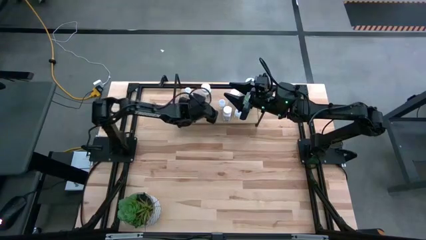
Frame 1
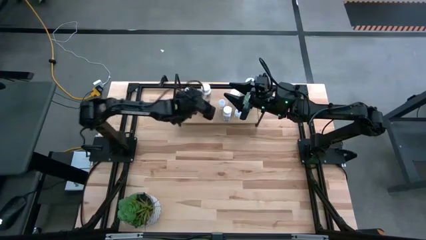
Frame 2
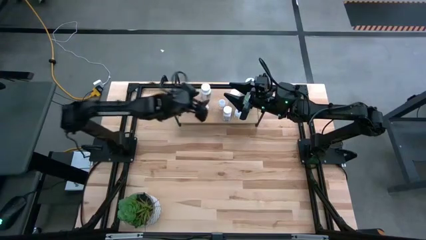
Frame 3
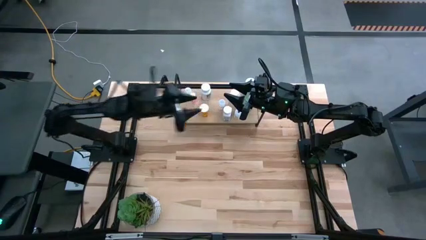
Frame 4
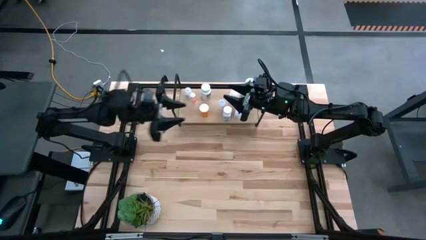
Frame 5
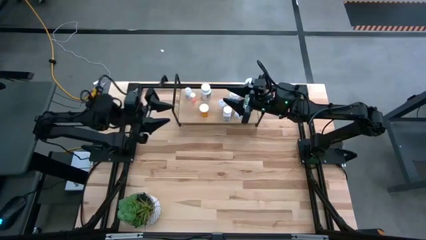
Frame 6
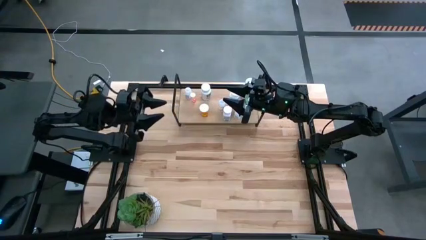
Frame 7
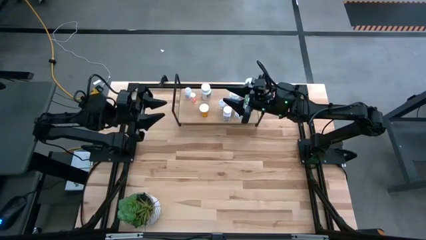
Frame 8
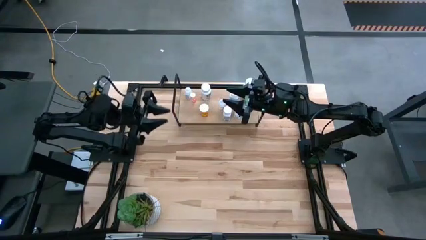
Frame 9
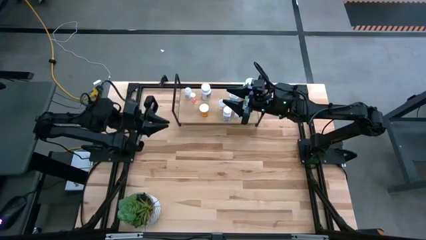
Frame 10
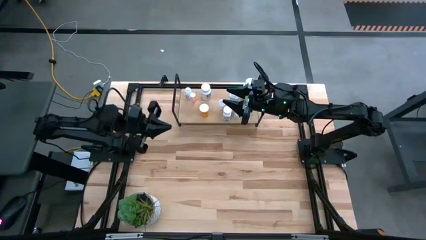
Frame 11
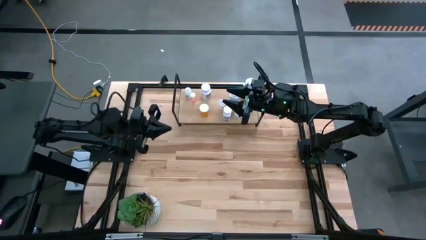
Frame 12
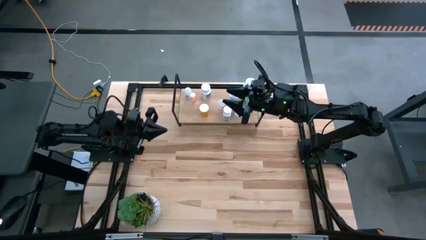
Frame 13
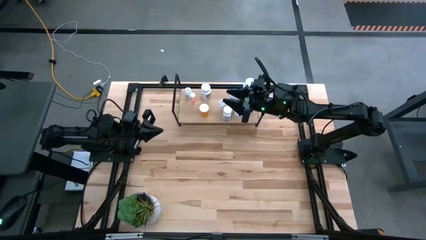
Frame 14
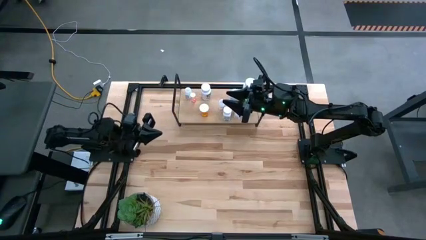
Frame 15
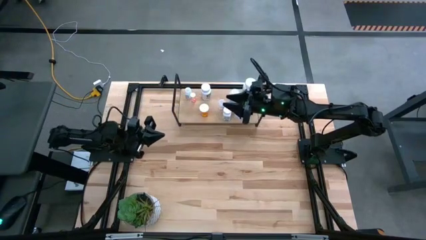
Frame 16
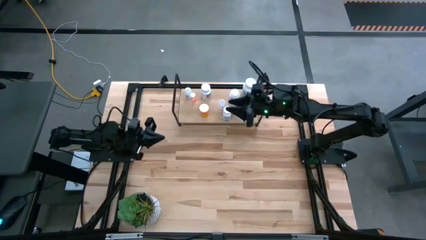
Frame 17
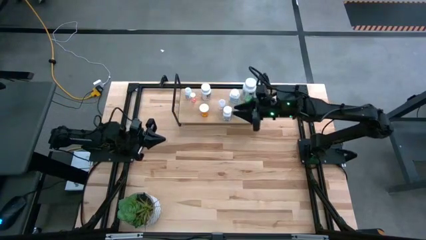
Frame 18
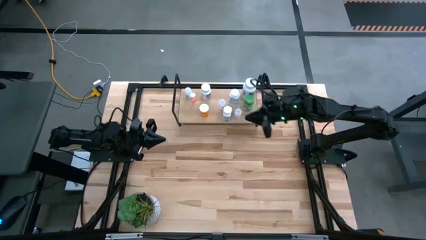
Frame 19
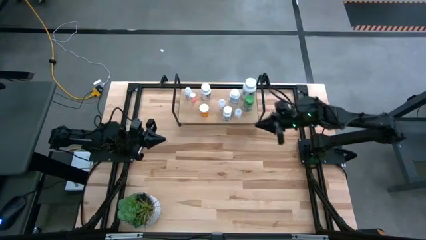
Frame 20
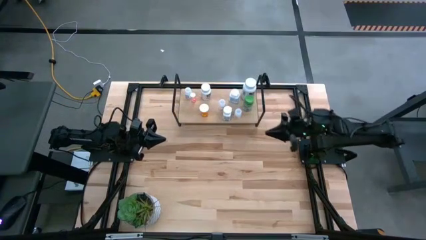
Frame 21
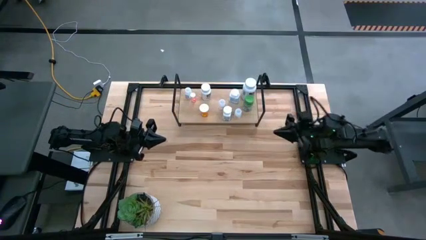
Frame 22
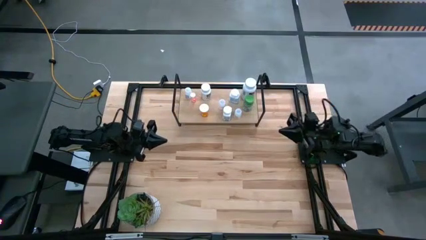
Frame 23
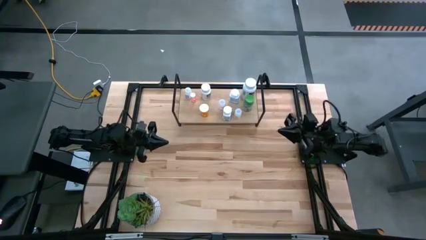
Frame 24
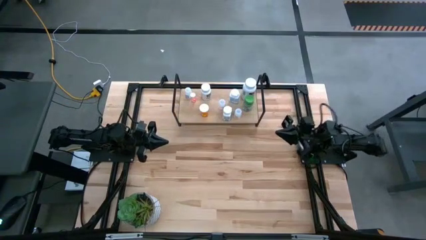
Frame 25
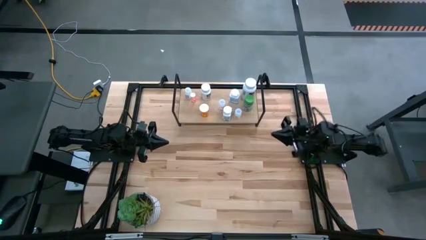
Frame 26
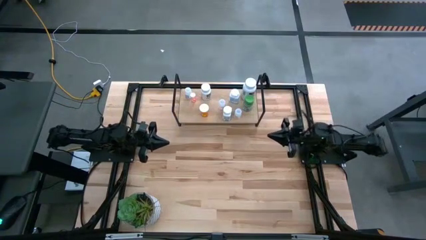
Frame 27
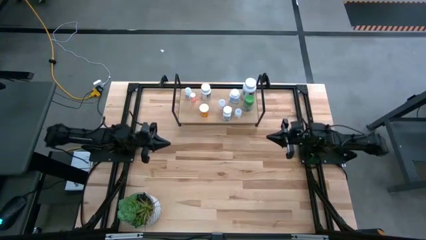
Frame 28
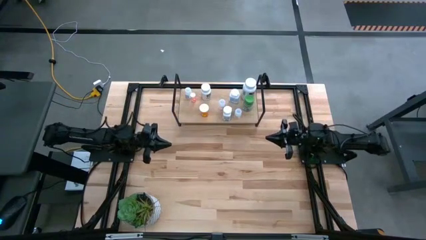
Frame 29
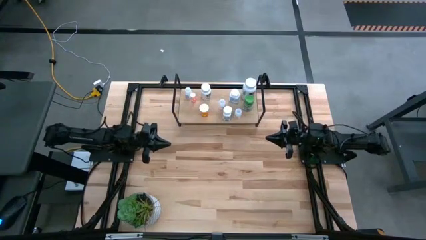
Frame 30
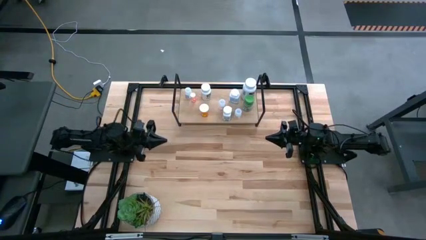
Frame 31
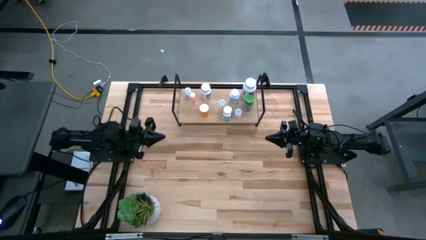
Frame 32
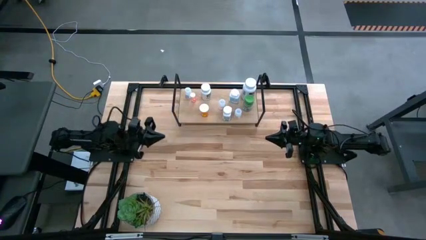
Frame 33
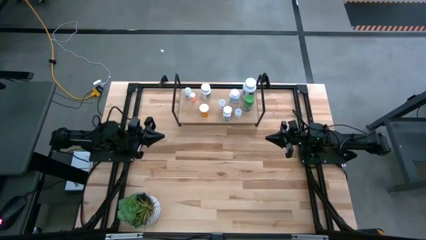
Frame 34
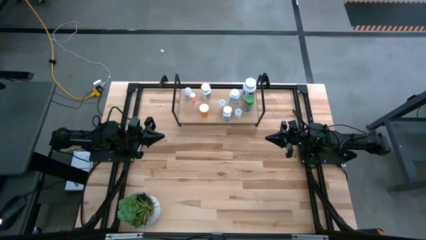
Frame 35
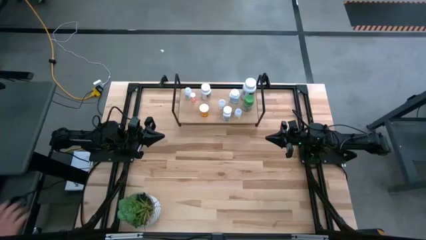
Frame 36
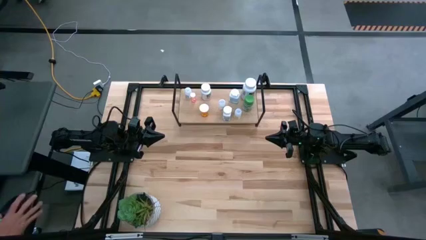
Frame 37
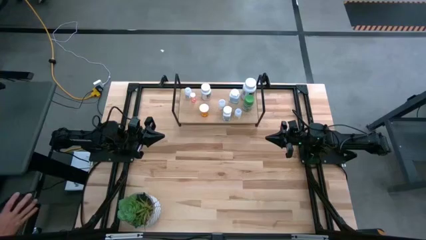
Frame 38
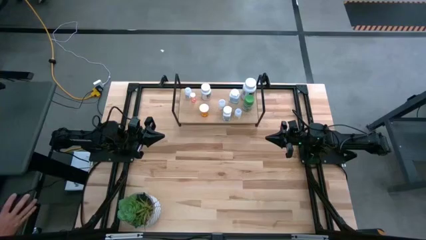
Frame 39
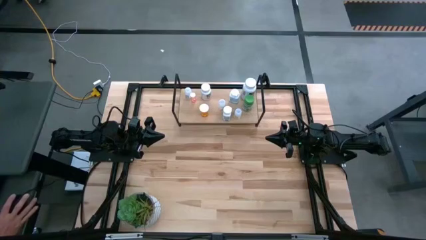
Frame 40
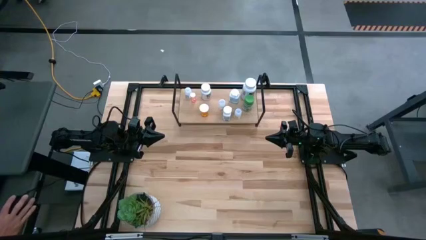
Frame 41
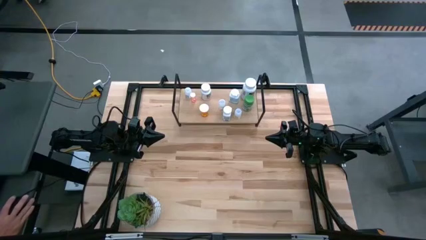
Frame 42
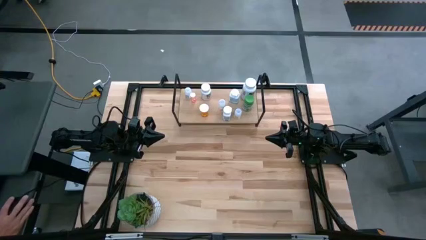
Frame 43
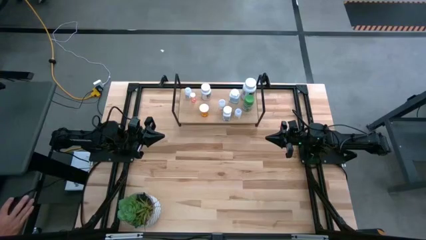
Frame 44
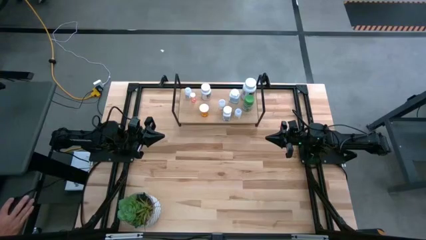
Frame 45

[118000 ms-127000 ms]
Task: Pick and place medicine bottles onto shelf by color
Return to Home Position
